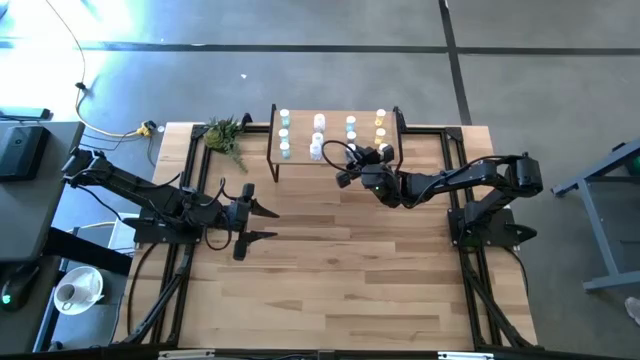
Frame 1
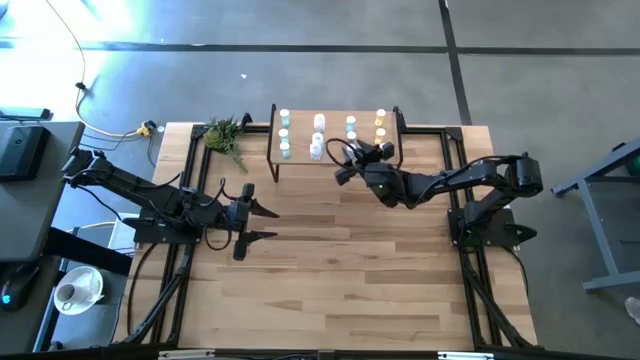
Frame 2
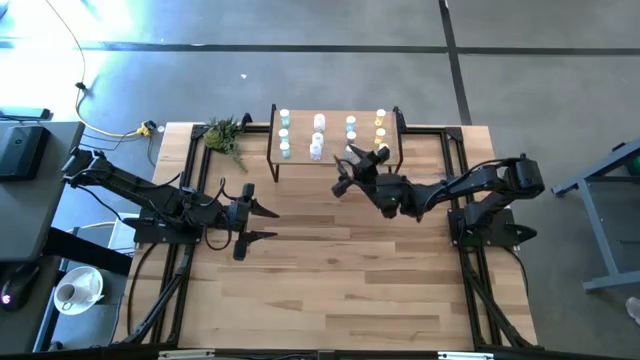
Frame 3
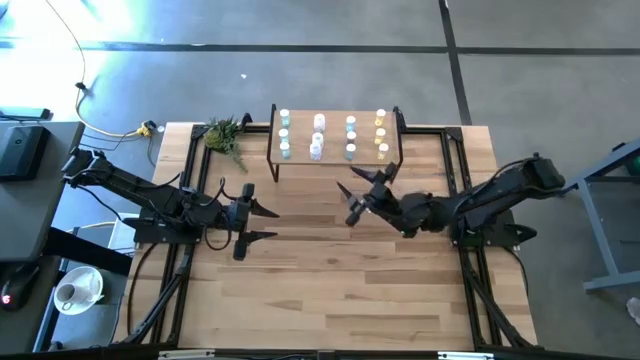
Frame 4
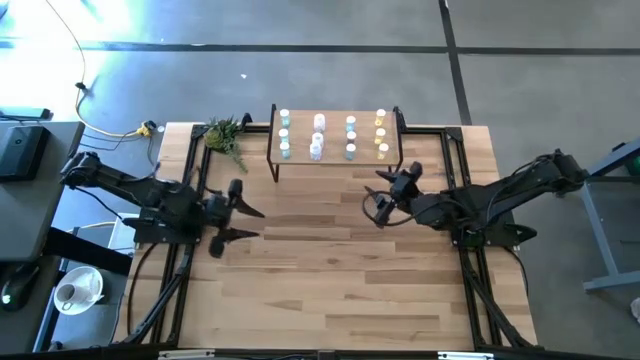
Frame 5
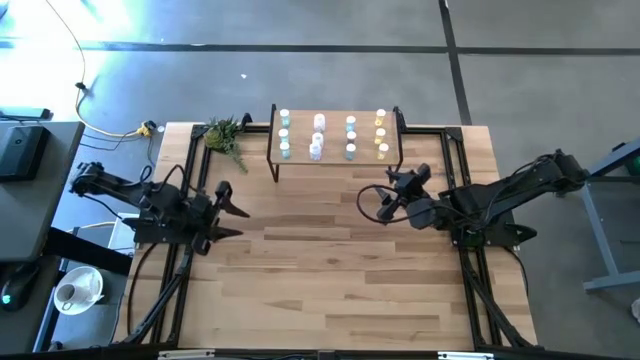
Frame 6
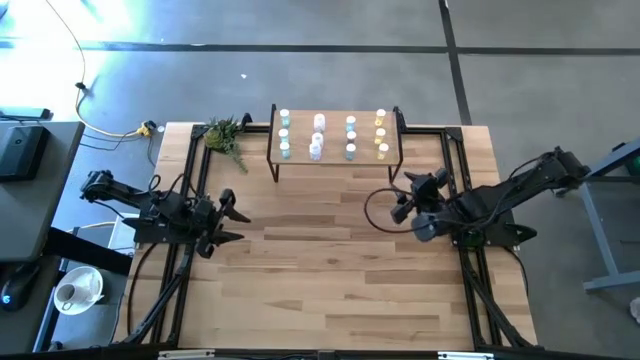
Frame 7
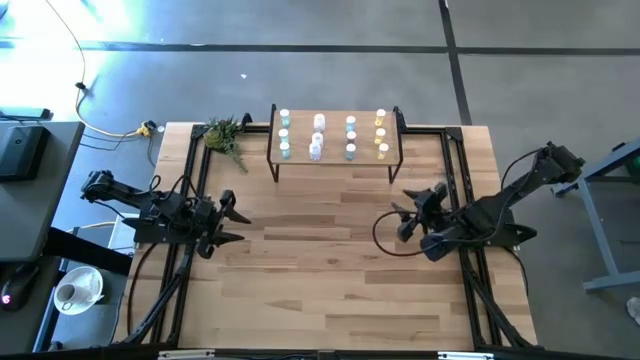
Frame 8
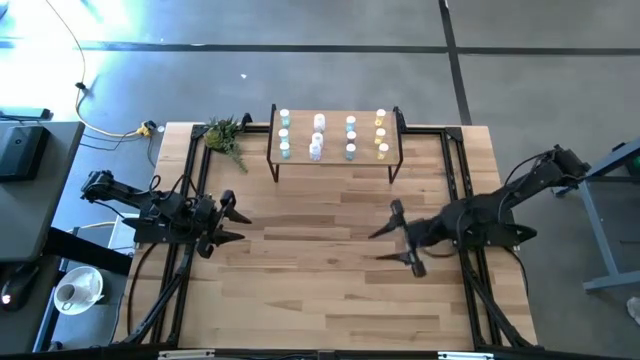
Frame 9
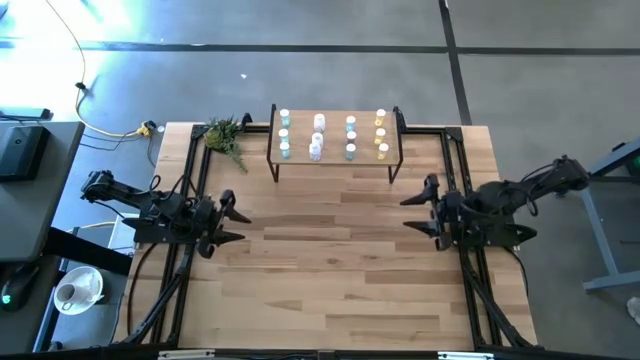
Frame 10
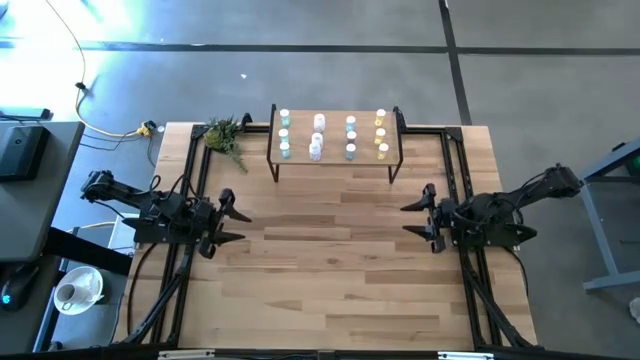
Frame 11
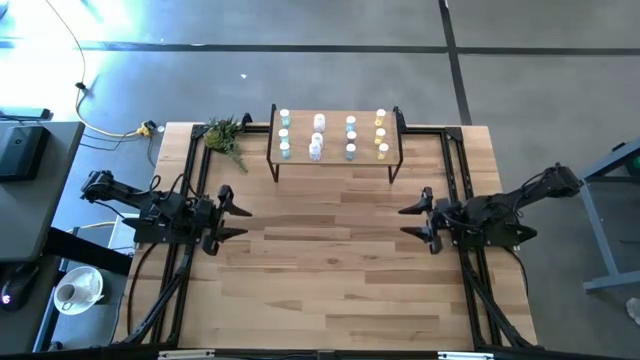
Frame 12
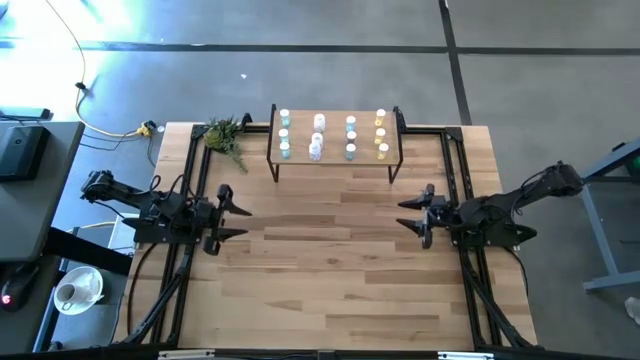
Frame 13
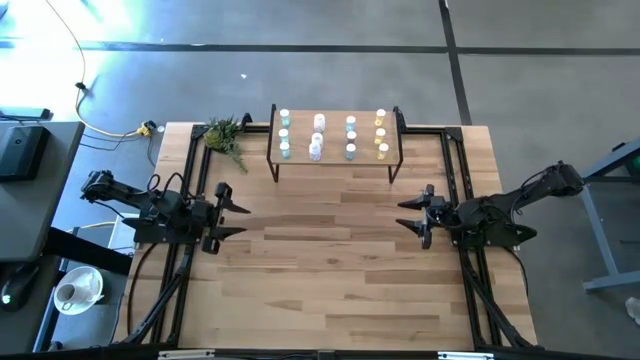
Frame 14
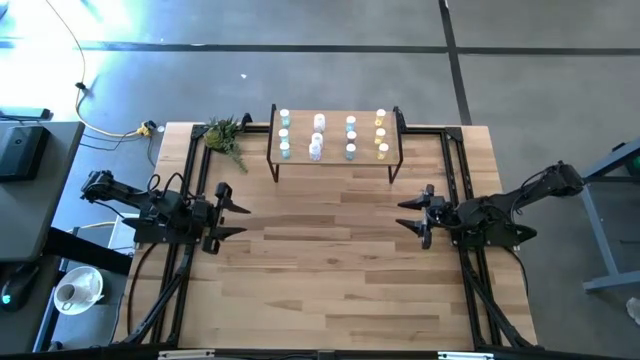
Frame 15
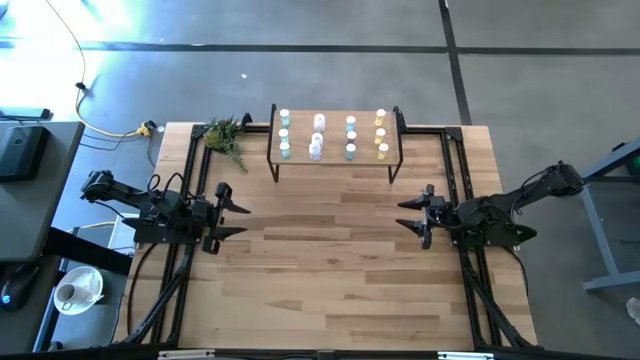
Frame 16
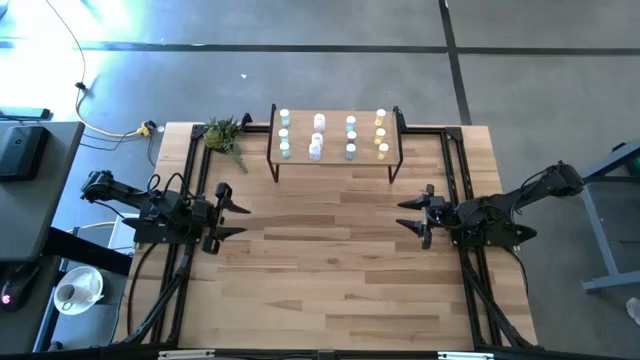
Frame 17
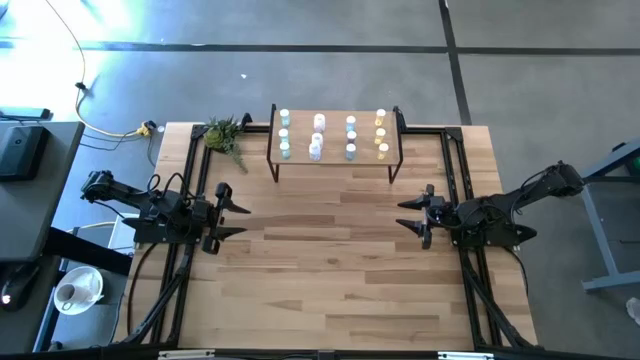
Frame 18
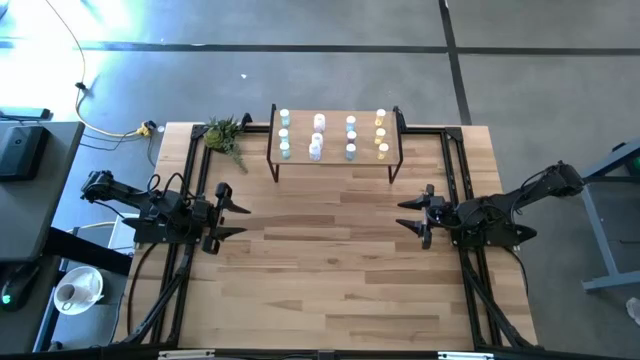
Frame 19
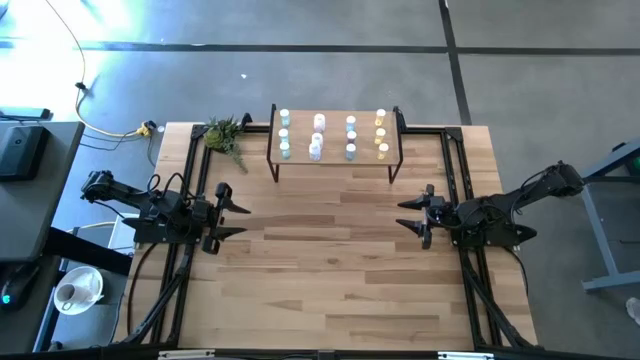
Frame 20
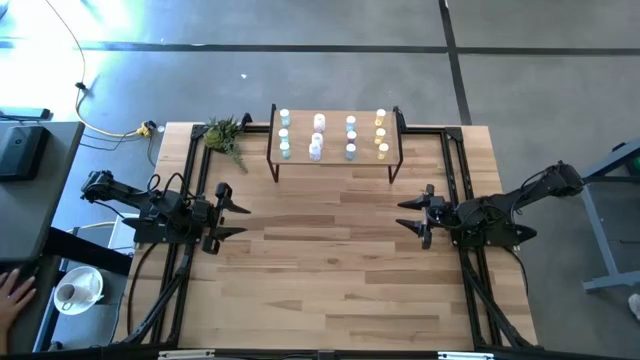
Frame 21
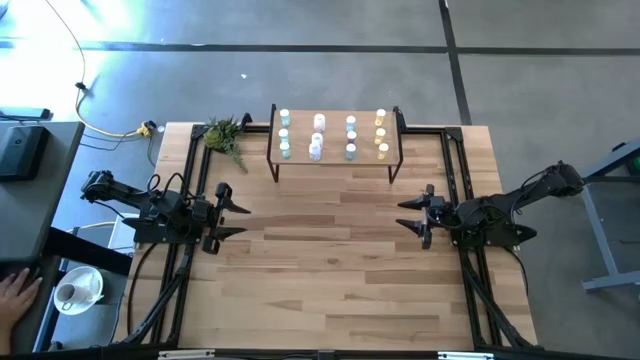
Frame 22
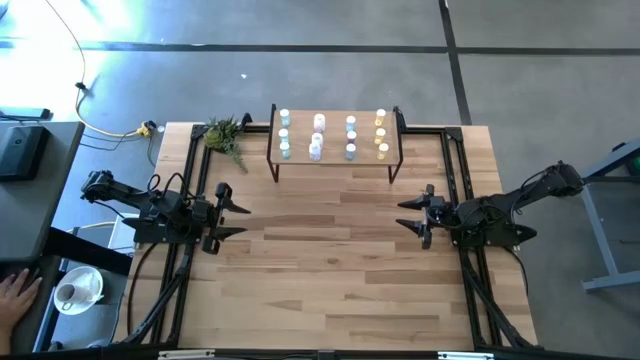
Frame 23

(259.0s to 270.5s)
Task: Pick and place medicine bottles onto shelf by color
Return to home position

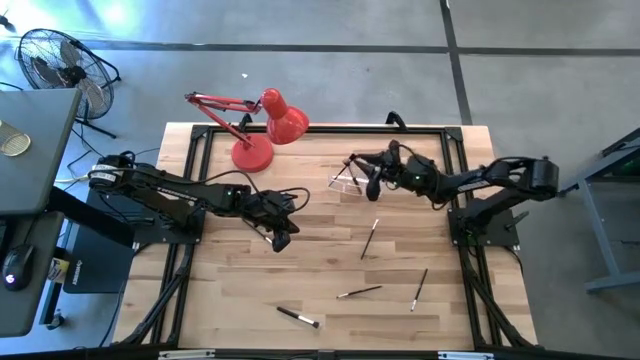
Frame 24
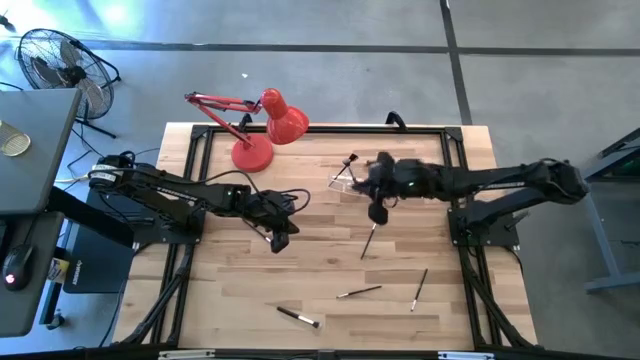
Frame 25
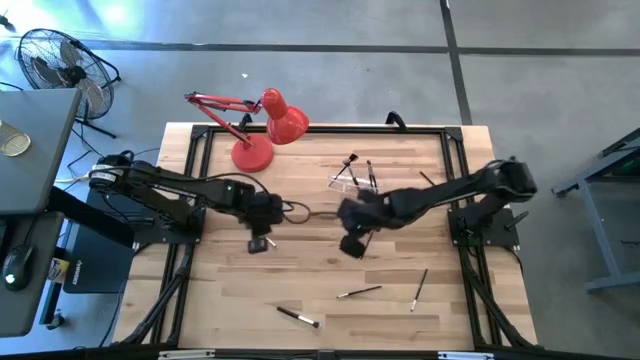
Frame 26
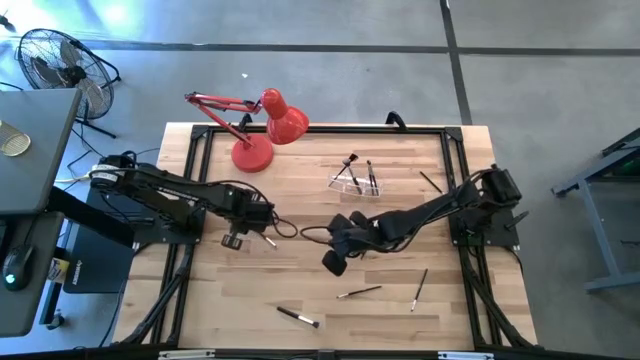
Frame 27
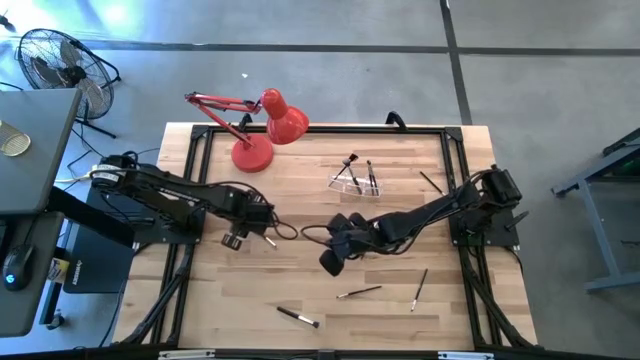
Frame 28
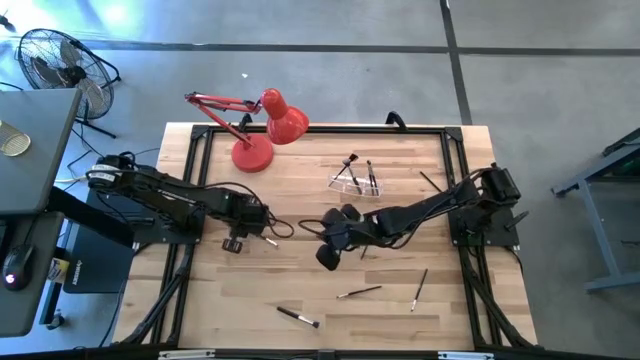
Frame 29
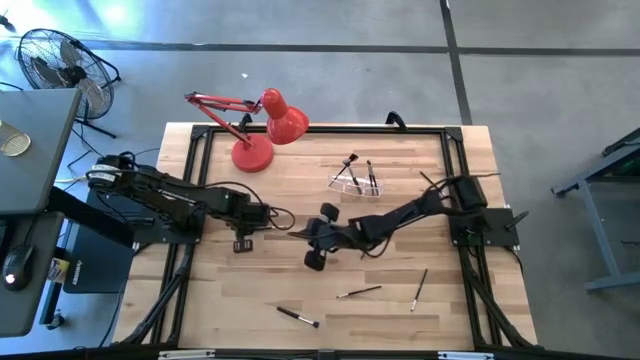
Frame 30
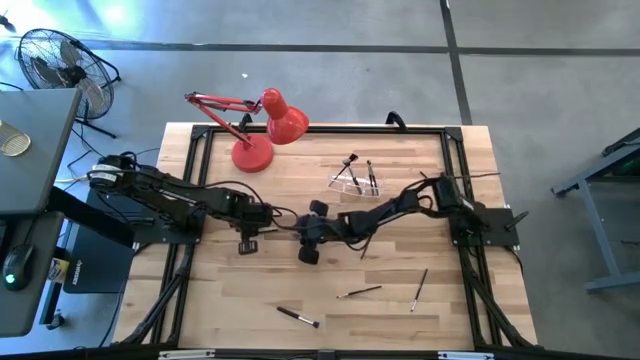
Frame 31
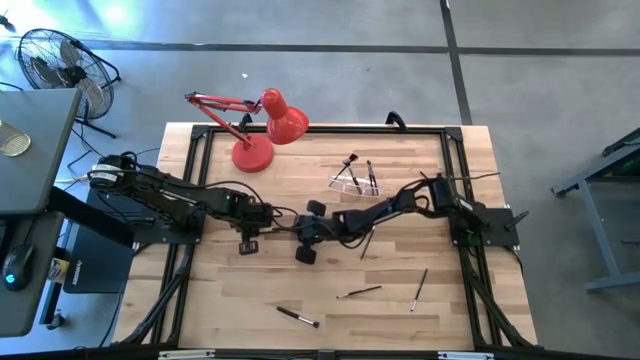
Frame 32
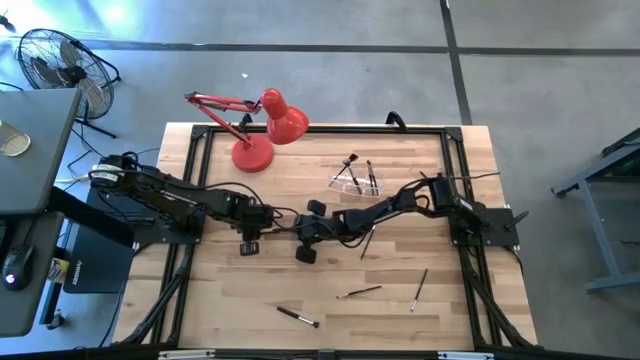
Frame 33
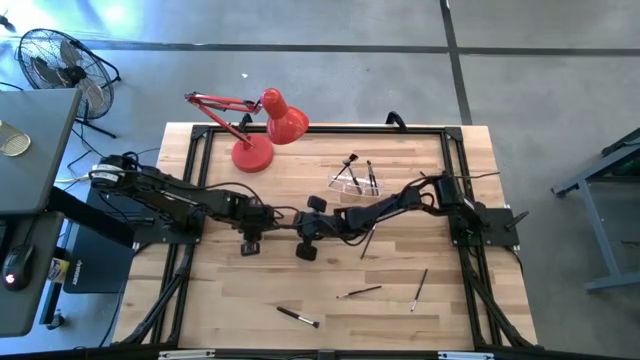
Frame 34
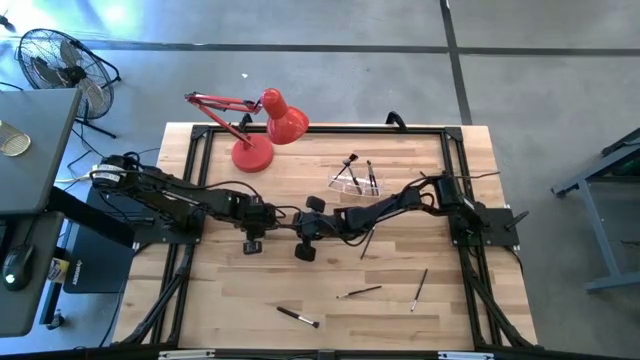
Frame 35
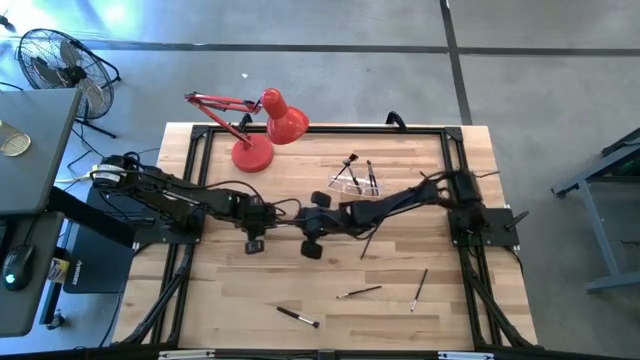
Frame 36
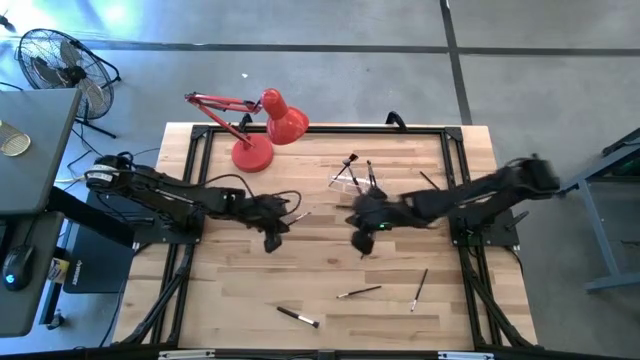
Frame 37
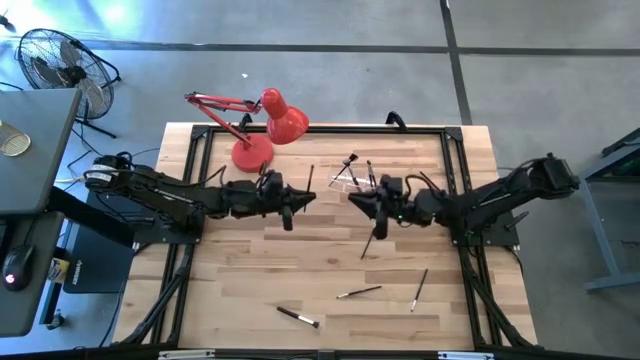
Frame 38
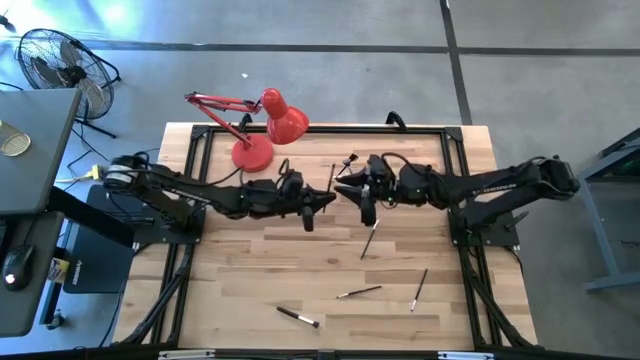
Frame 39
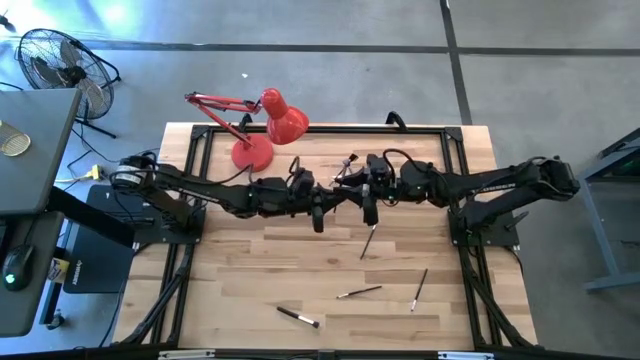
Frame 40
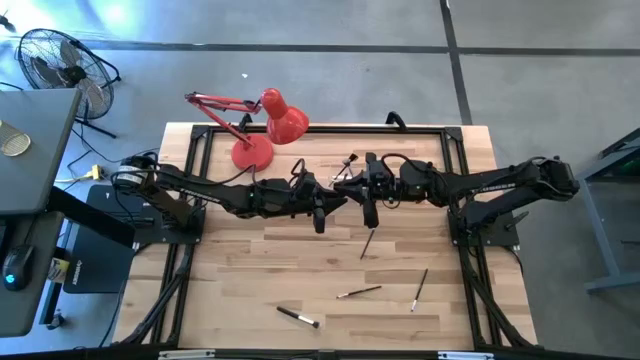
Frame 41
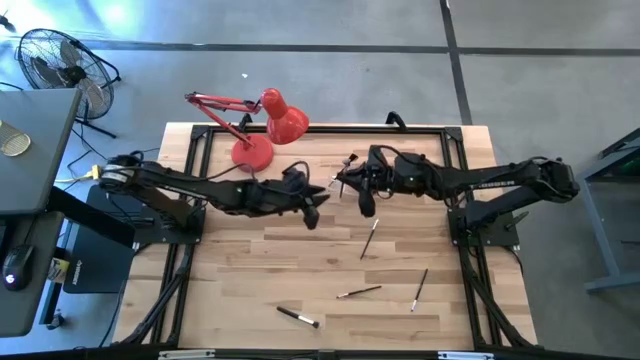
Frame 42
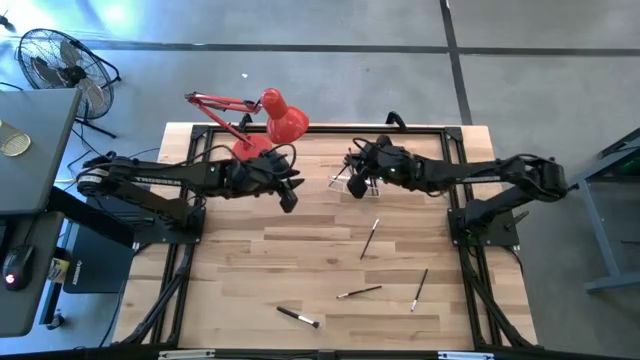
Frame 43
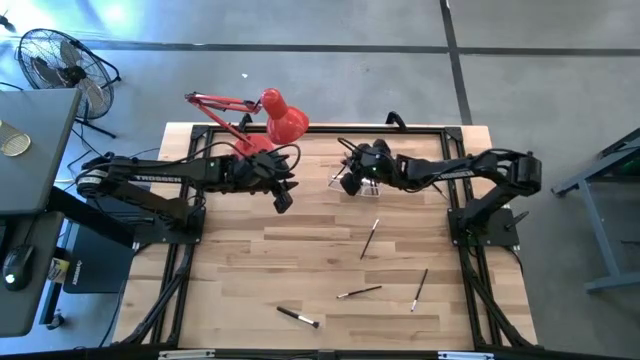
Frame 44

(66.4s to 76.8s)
Task: Put items in baskets/containers
Put the eyeshadow brush into the transparent organizer
